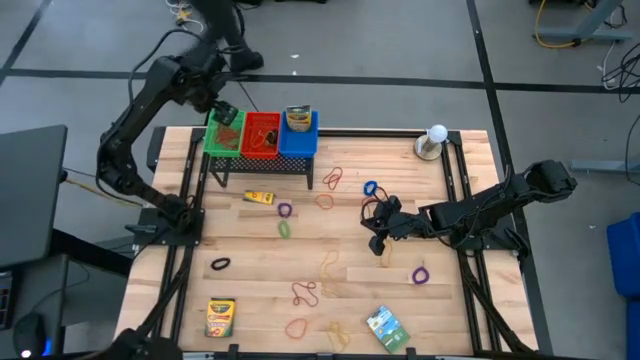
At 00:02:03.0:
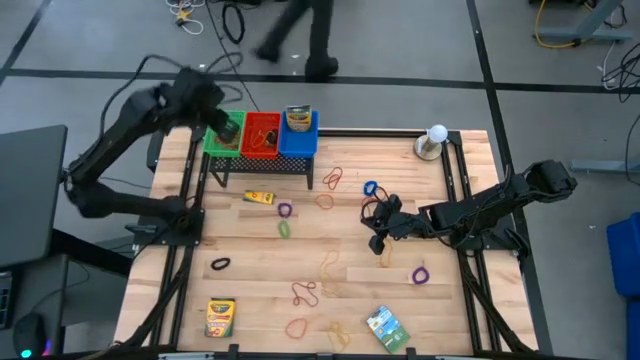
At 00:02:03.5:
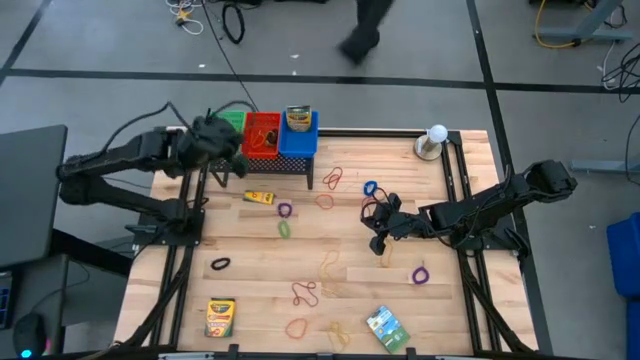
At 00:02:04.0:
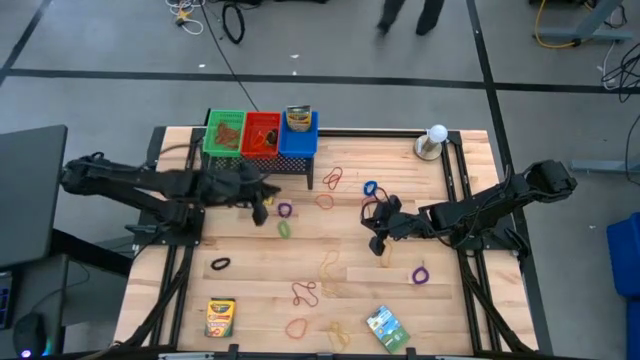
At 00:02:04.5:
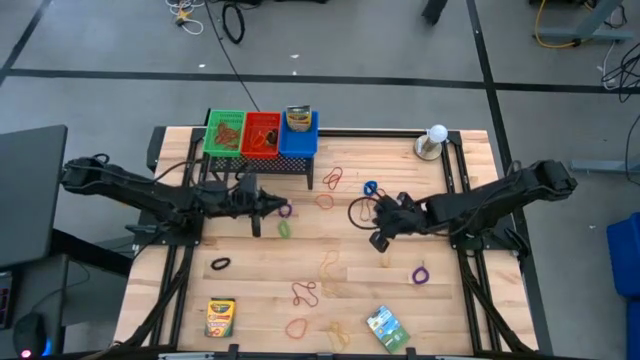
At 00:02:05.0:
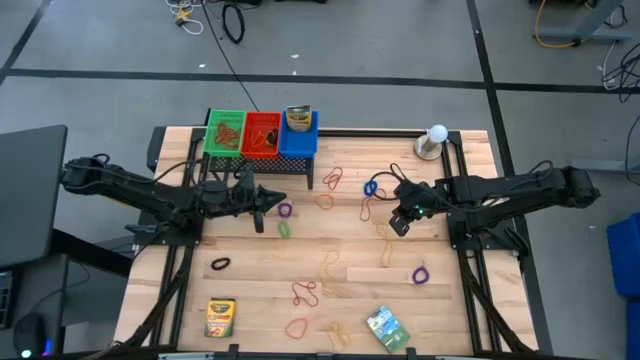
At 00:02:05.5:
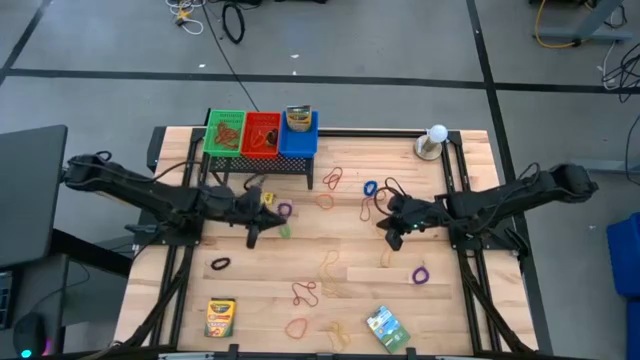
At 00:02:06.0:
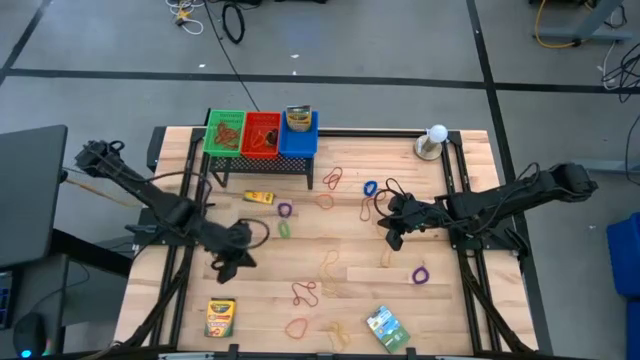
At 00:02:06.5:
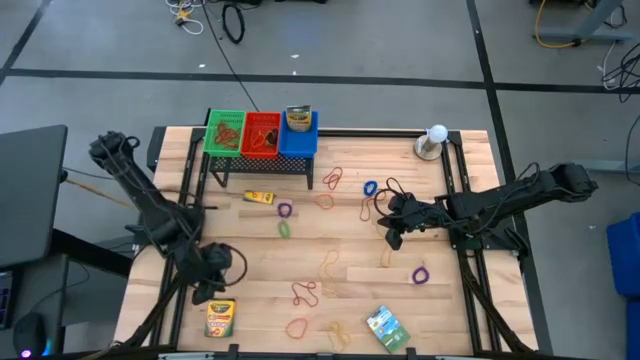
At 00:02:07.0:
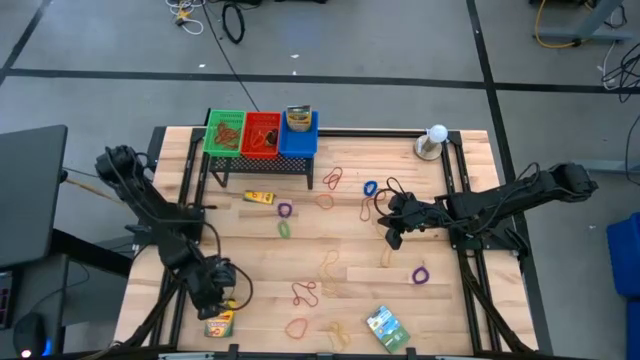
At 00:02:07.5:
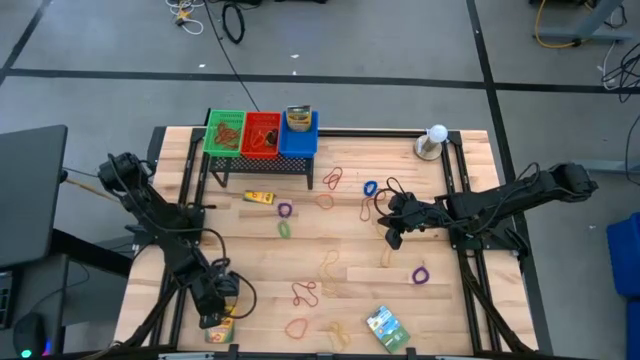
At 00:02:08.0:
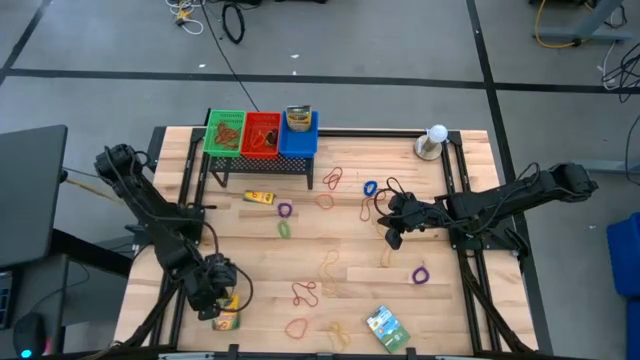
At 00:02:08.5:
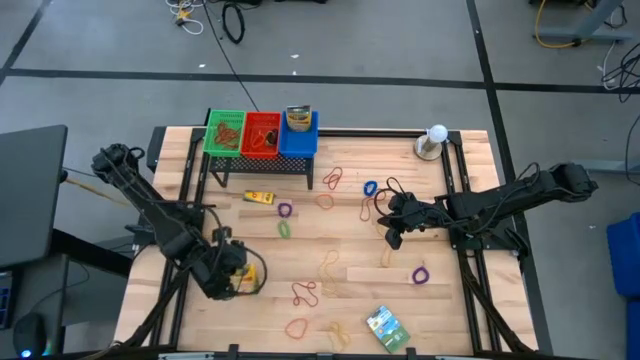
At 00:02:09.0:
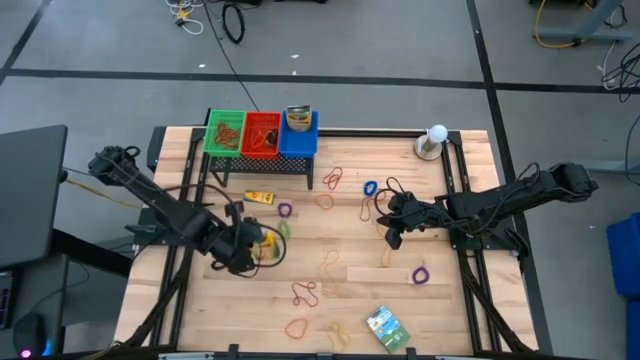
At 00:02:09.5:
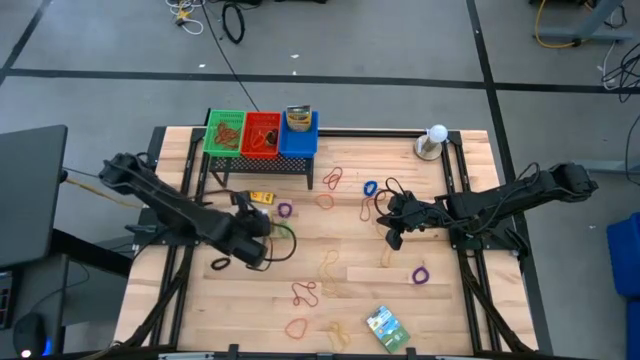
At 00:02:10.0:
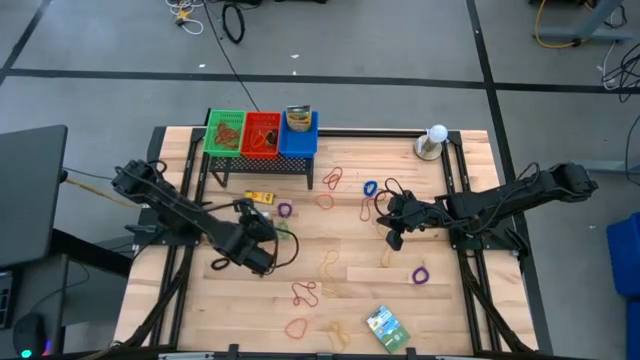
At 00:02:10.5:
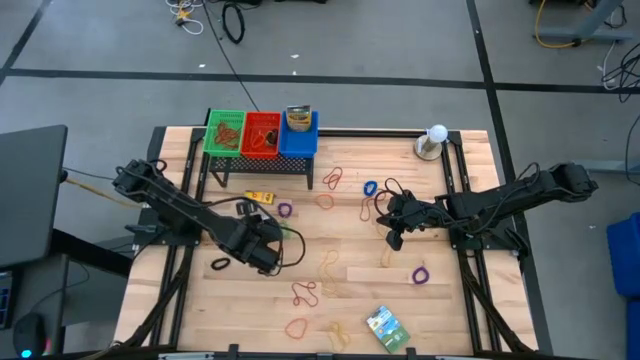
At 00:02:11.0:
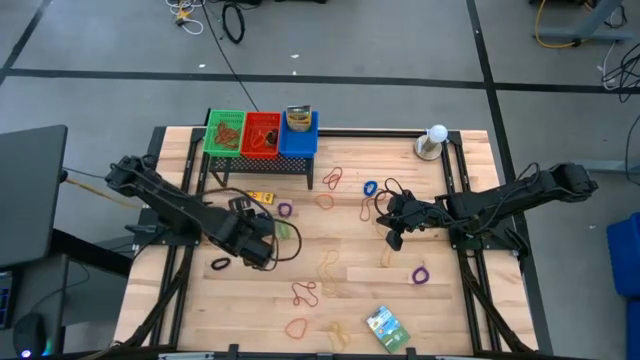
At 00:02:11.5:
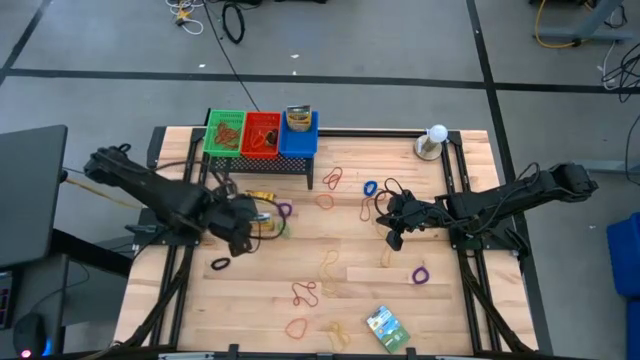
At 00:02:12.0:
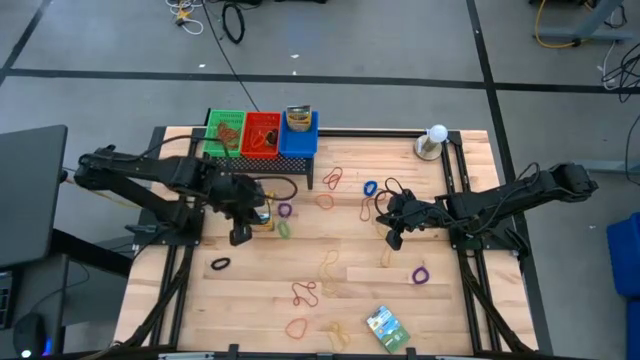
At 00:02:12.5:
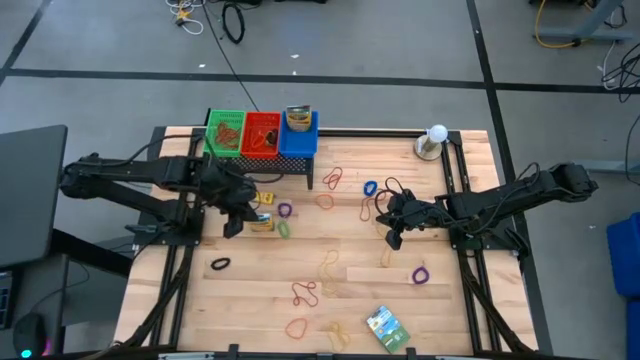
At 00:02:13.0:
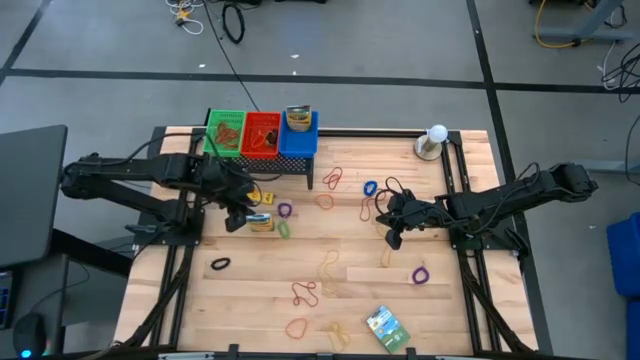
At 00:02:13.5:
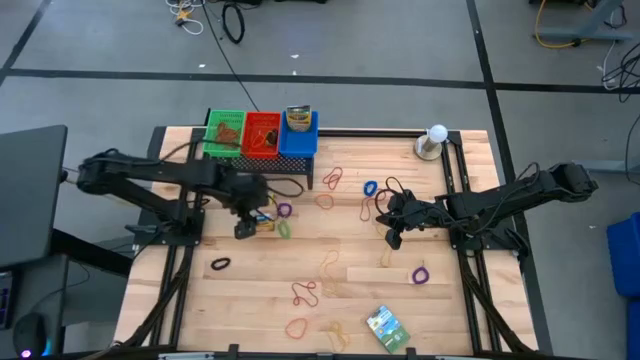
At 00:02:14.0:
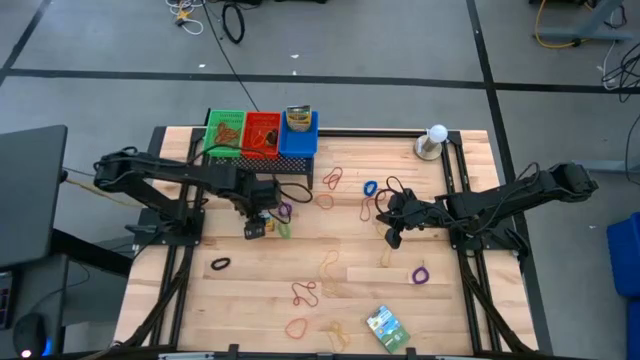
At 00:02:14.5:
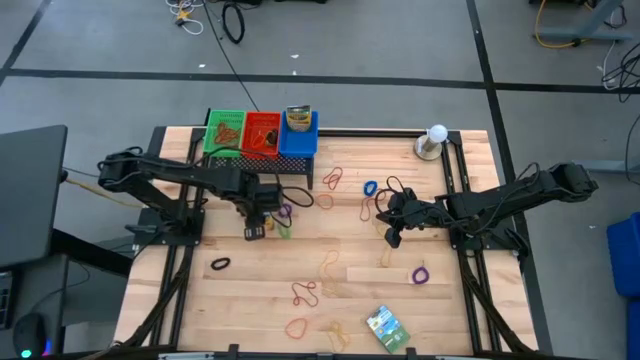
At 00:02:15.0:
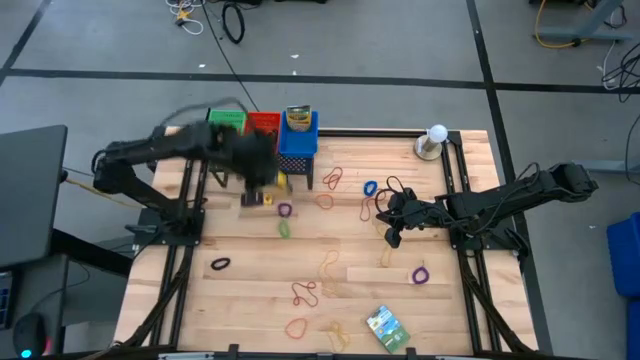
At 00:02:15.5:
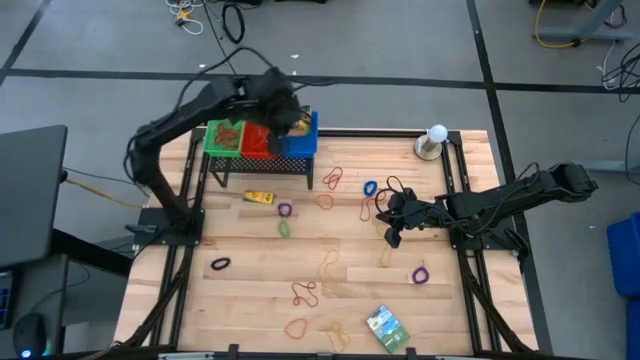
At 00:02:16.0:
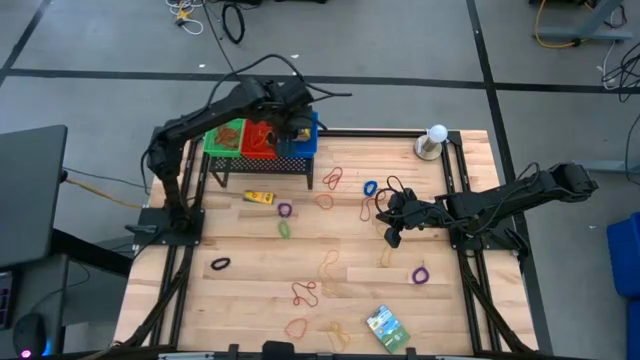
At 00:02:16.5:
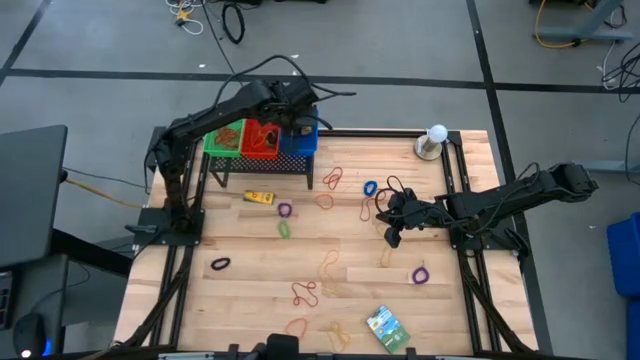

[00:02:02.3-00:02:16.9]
Task: Pick & Place Office Desk Supplies
Put the big box of crayons into the blue bin on the shelf

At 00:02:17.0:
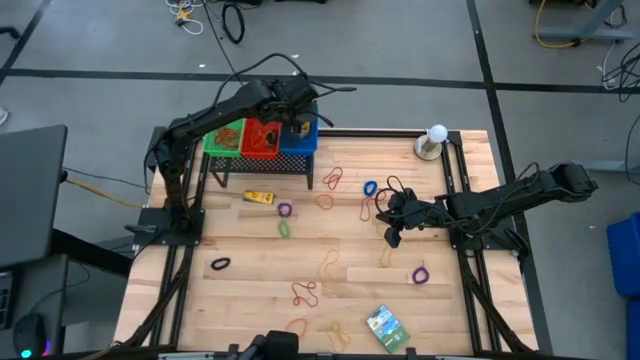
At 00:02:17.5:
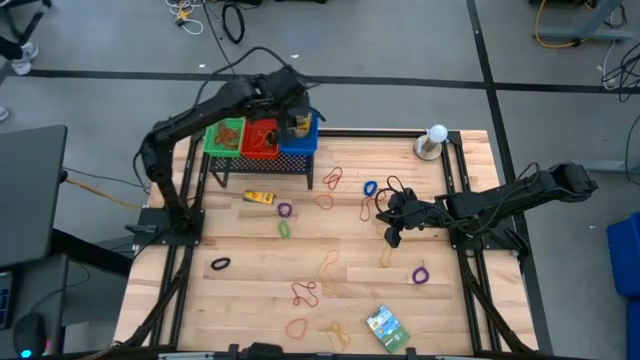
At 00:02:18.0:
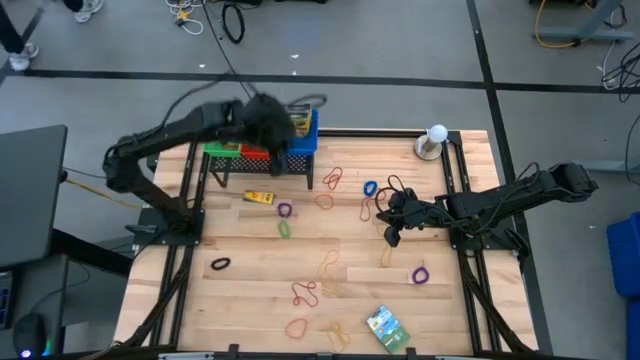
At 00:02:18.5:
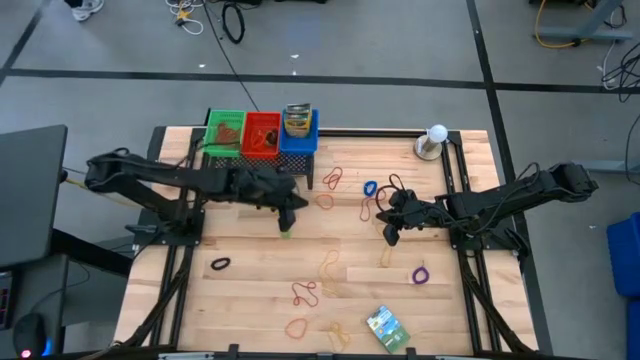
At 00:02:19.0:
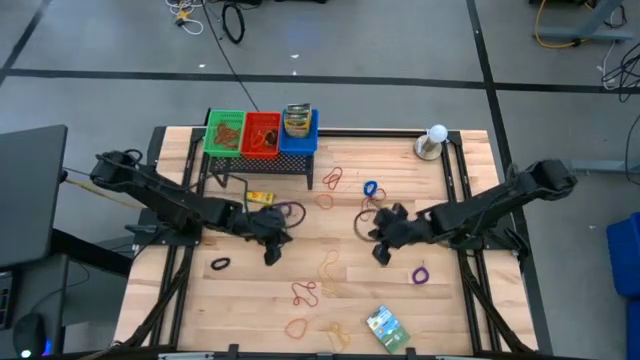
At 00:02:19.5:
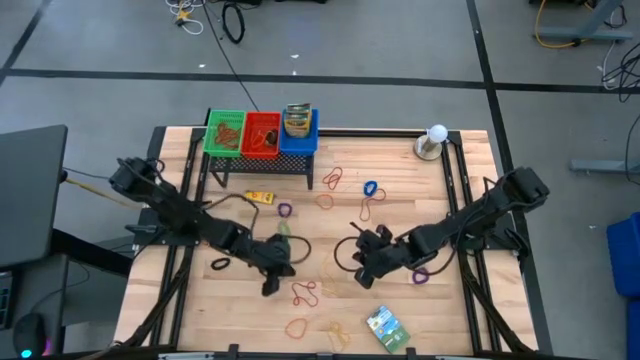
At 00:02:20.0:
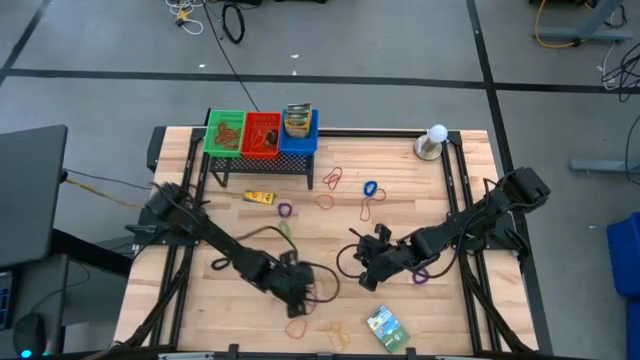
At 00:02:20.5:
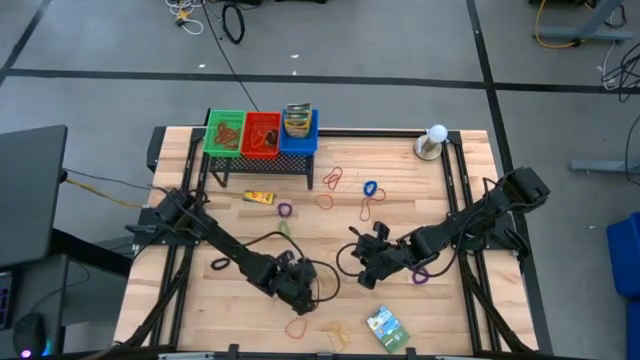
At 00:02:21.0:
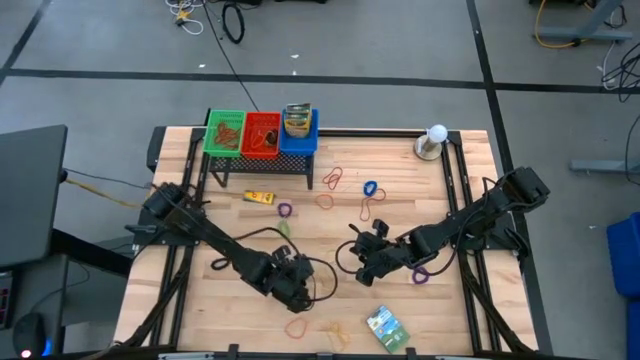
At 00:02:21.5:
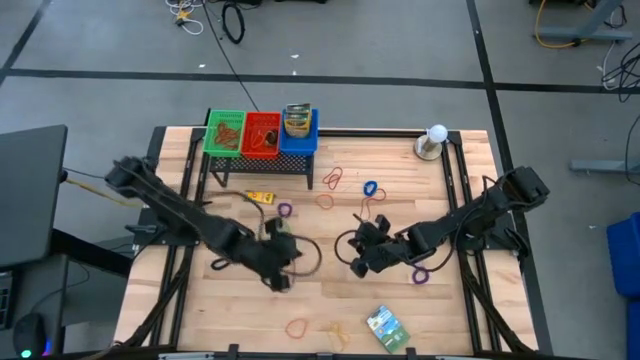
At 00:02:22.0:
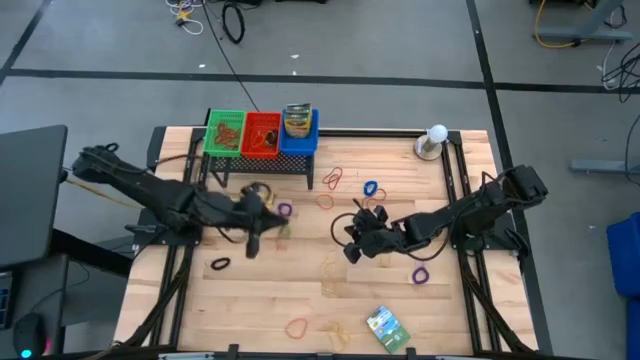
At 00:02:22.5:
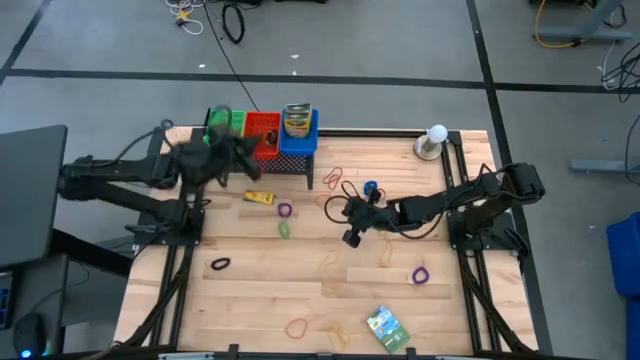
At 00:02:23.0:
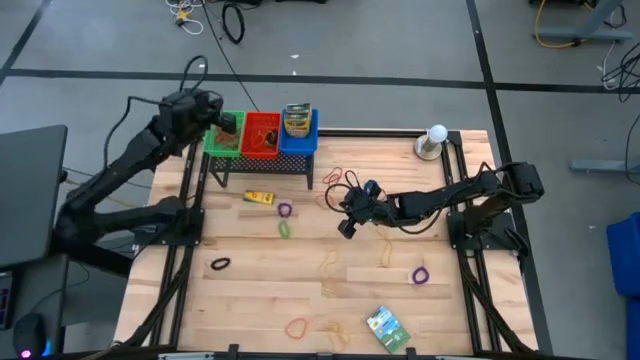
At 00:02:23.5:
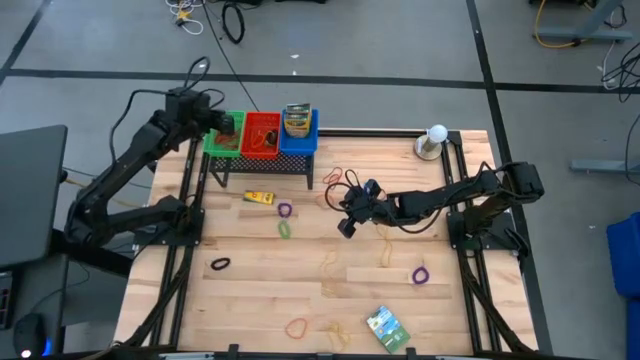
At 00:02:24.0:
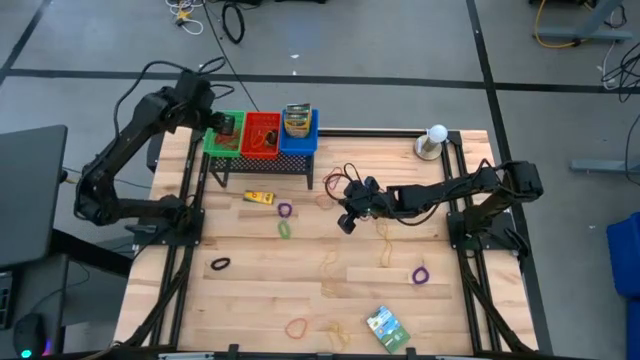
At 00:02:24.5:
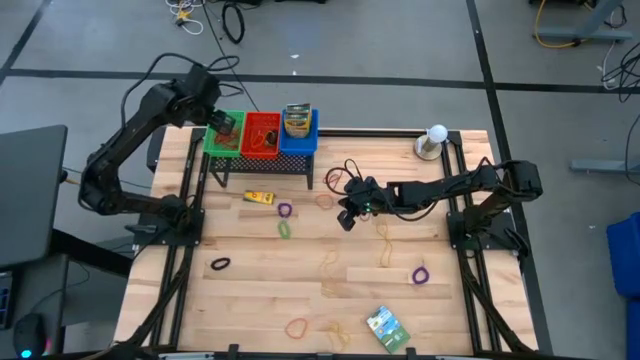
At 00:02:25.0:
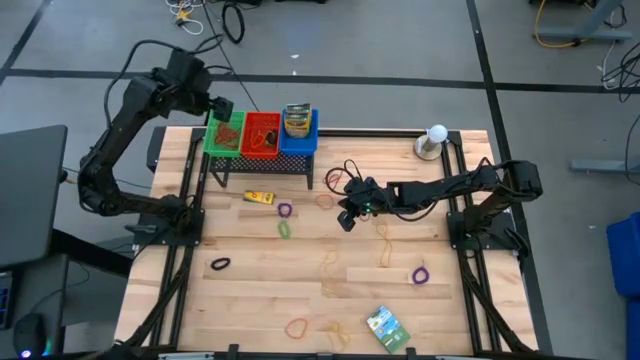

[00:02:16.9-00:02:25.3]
Put the red rubber band into the green bin on the shelf
